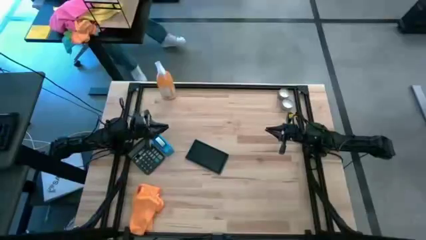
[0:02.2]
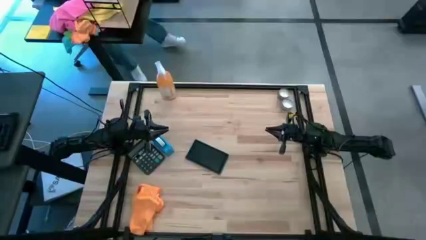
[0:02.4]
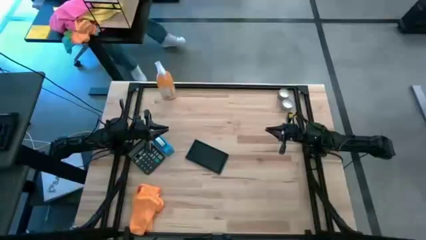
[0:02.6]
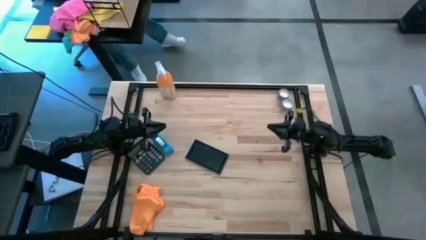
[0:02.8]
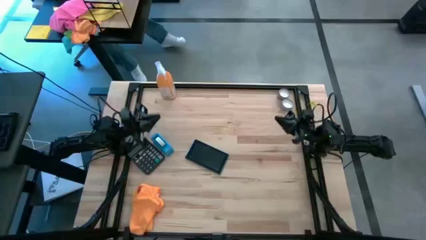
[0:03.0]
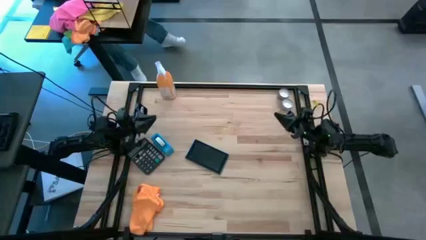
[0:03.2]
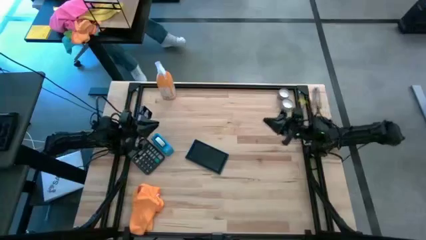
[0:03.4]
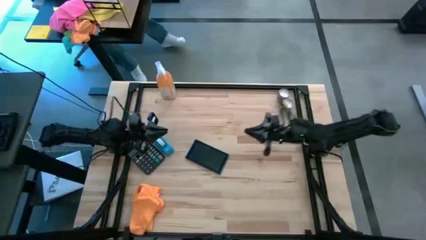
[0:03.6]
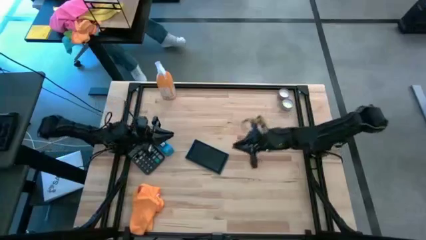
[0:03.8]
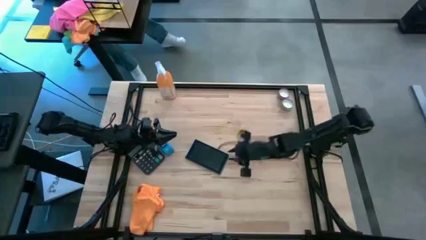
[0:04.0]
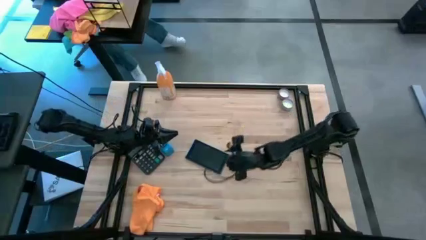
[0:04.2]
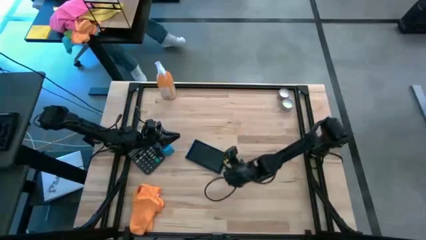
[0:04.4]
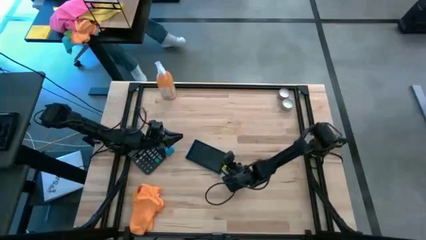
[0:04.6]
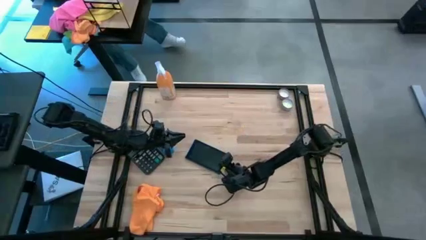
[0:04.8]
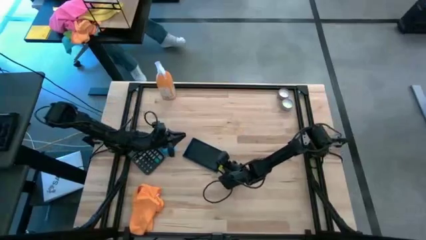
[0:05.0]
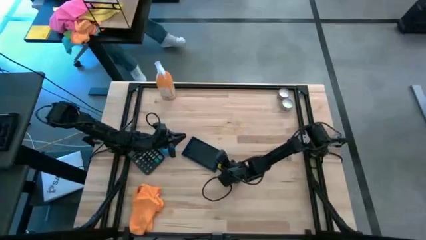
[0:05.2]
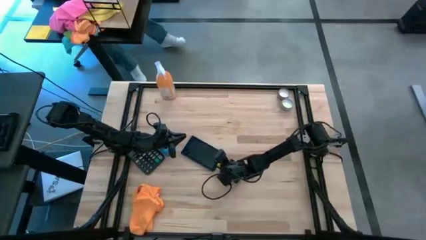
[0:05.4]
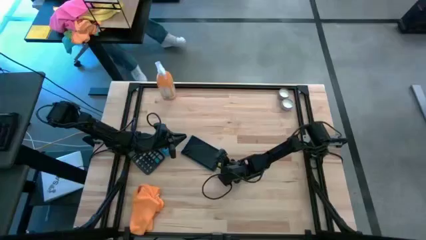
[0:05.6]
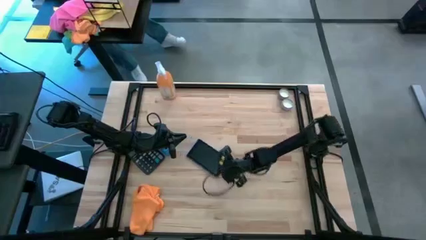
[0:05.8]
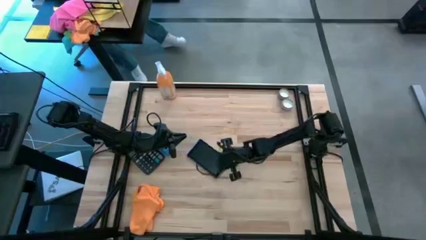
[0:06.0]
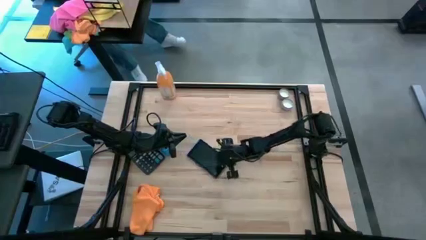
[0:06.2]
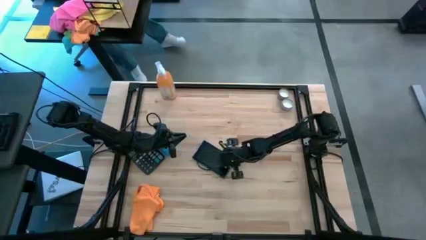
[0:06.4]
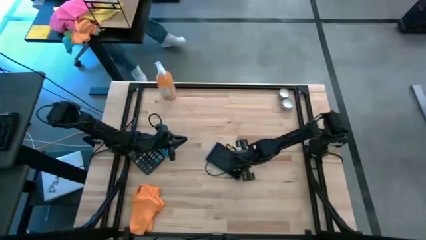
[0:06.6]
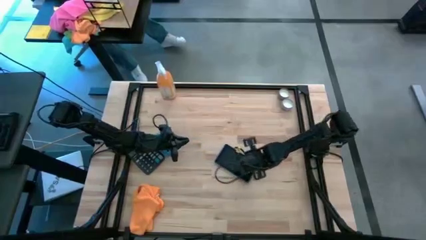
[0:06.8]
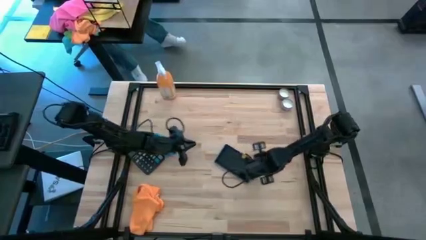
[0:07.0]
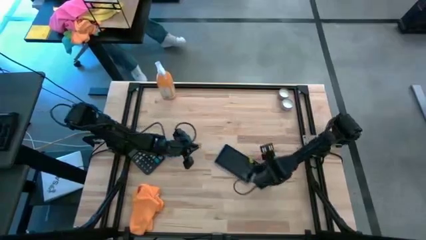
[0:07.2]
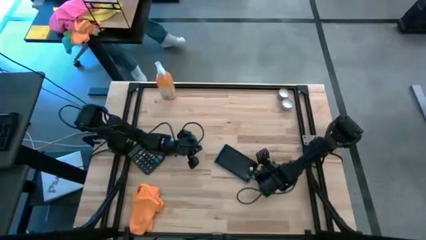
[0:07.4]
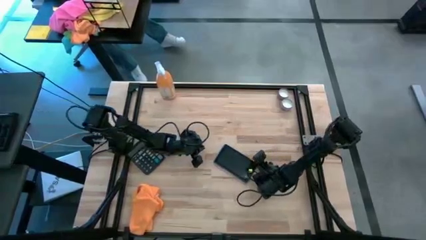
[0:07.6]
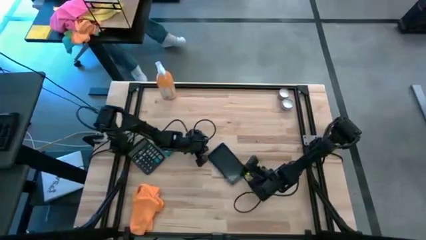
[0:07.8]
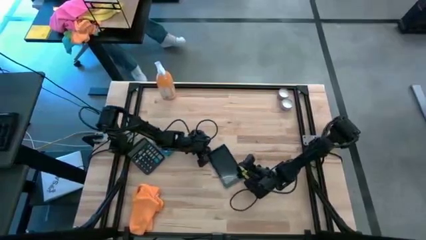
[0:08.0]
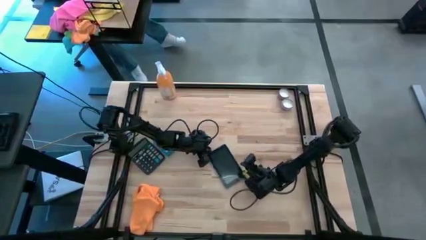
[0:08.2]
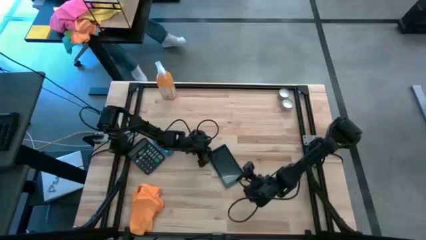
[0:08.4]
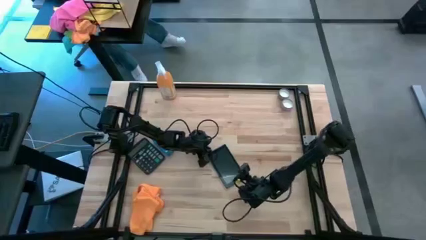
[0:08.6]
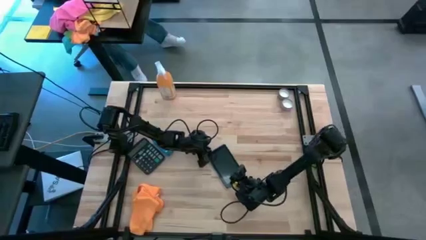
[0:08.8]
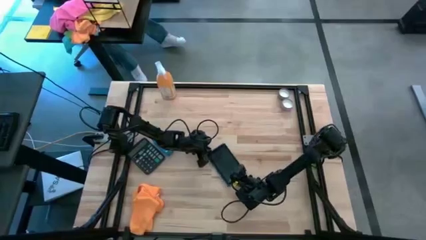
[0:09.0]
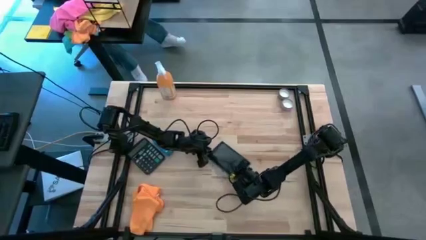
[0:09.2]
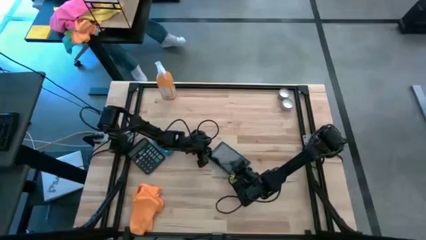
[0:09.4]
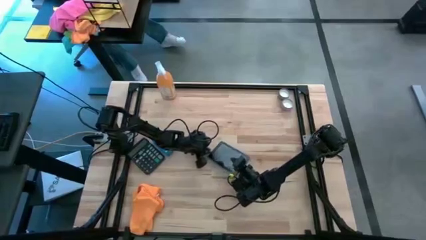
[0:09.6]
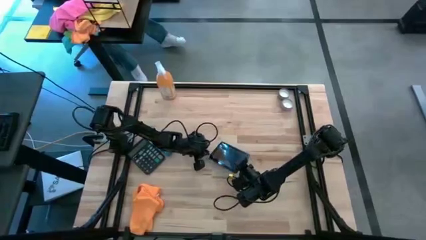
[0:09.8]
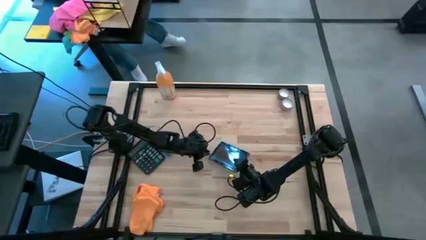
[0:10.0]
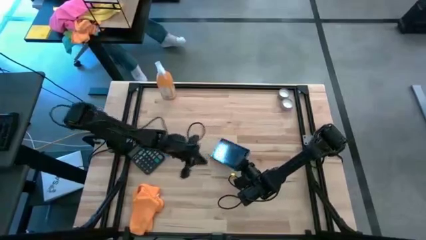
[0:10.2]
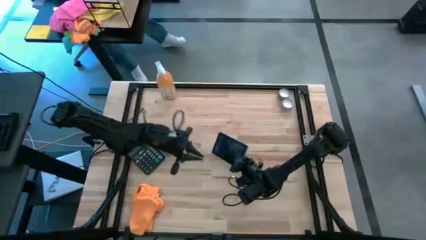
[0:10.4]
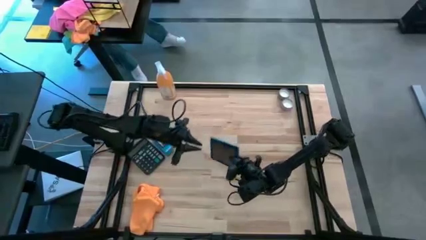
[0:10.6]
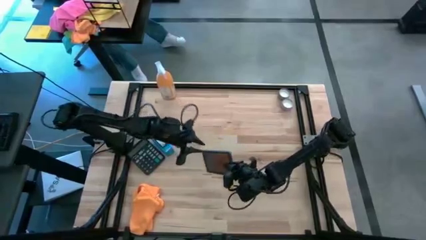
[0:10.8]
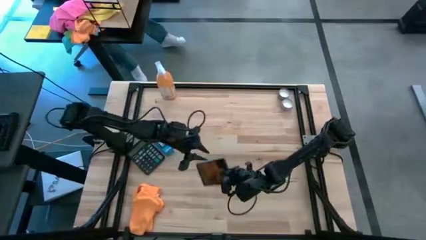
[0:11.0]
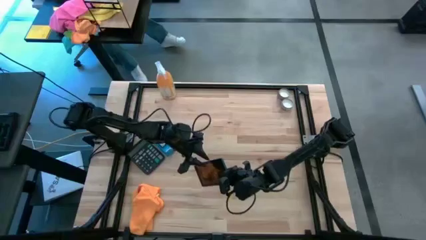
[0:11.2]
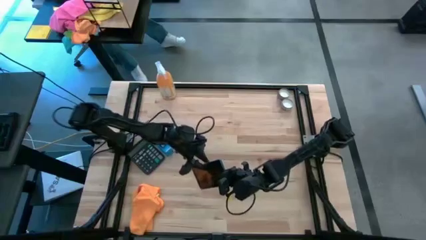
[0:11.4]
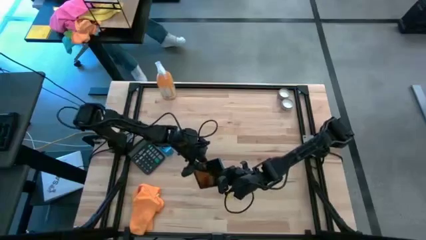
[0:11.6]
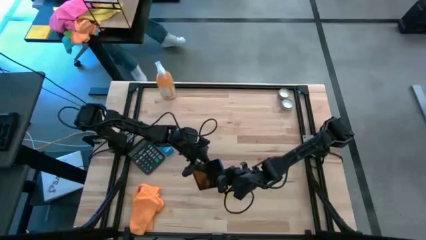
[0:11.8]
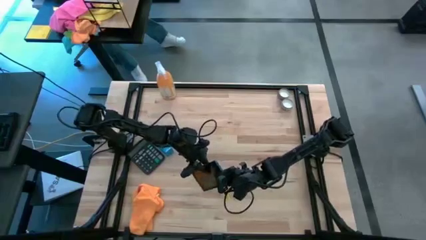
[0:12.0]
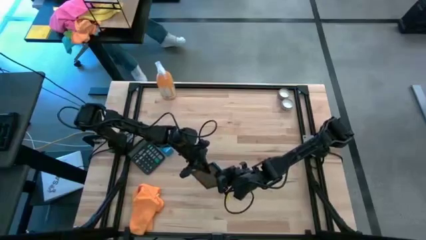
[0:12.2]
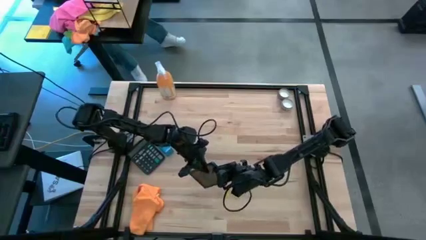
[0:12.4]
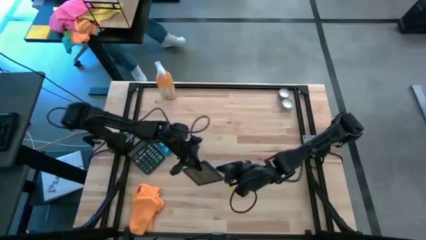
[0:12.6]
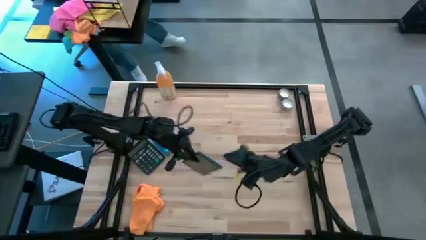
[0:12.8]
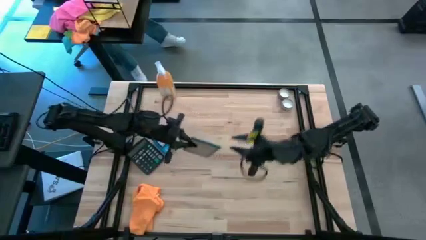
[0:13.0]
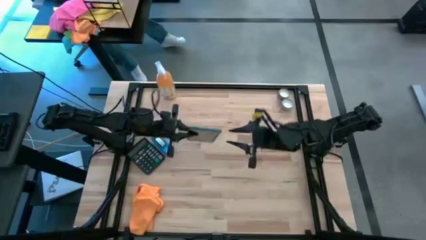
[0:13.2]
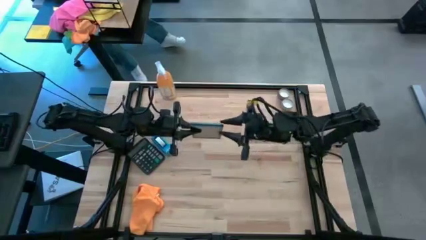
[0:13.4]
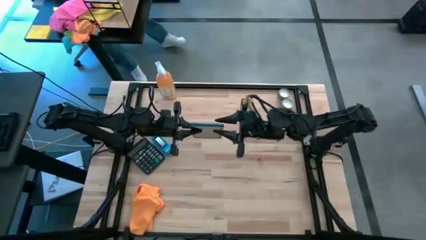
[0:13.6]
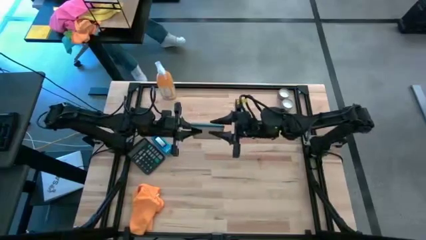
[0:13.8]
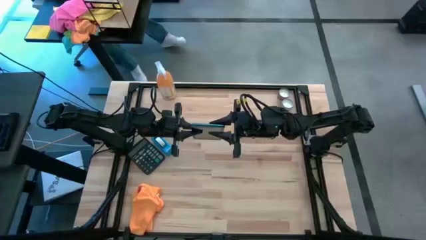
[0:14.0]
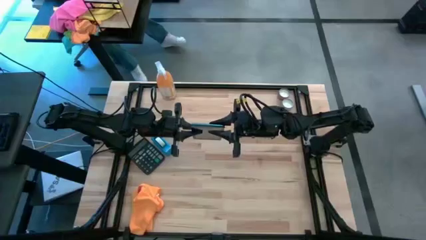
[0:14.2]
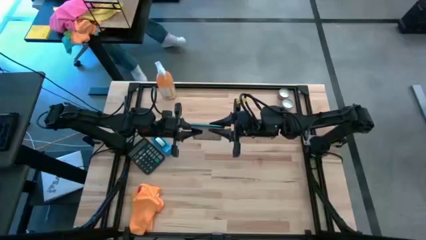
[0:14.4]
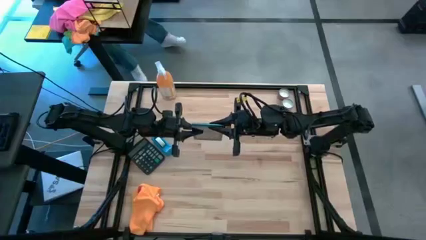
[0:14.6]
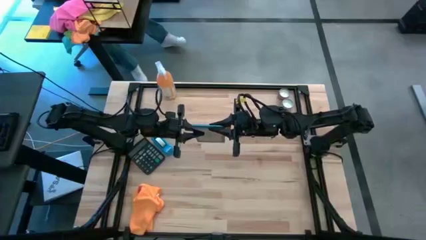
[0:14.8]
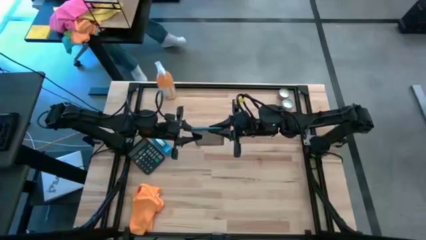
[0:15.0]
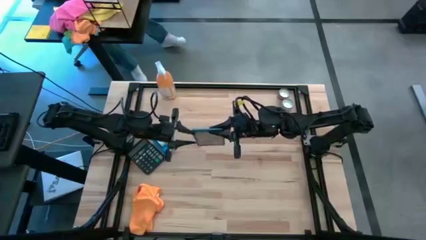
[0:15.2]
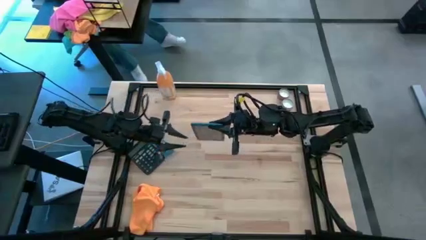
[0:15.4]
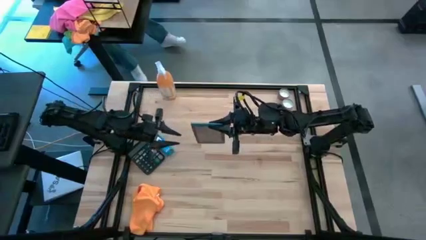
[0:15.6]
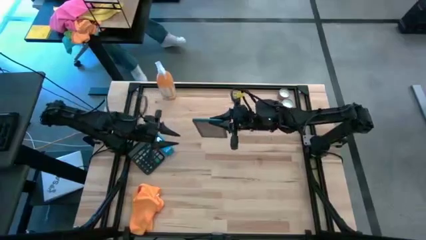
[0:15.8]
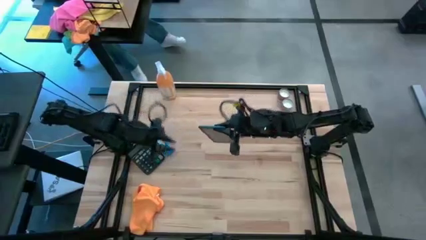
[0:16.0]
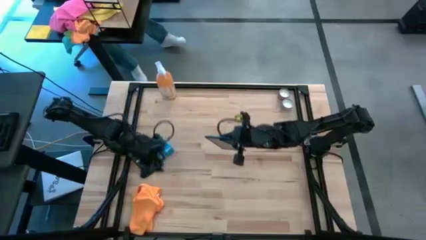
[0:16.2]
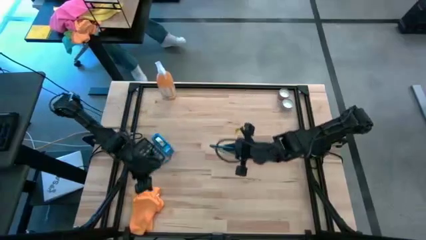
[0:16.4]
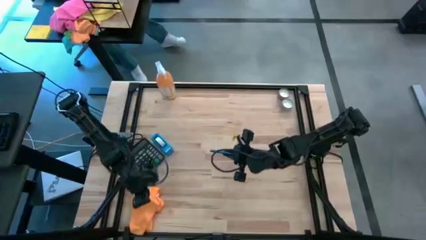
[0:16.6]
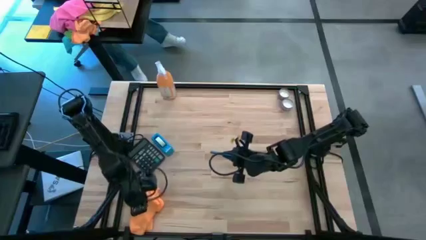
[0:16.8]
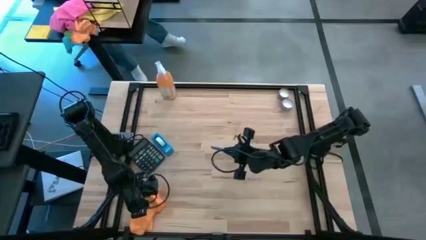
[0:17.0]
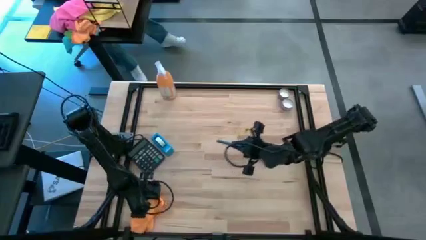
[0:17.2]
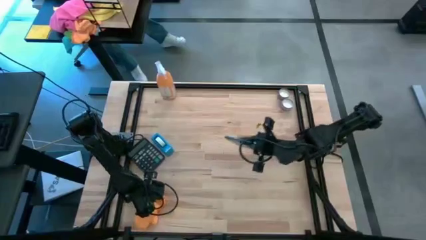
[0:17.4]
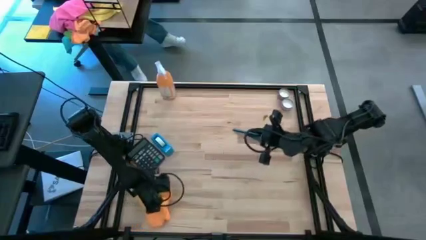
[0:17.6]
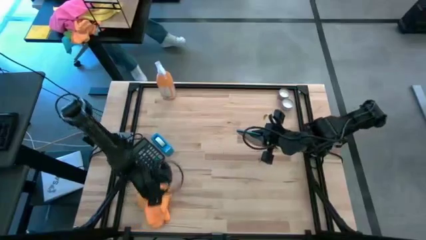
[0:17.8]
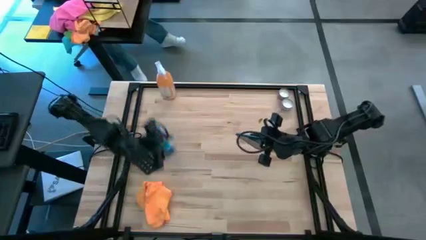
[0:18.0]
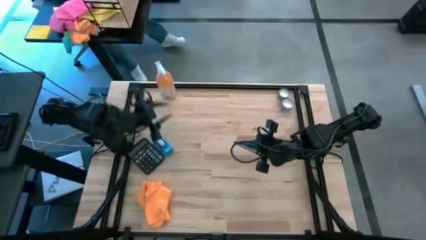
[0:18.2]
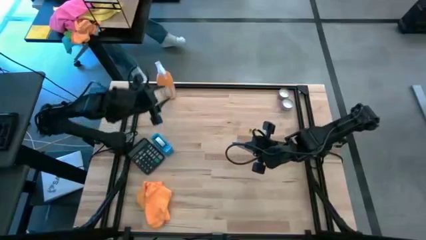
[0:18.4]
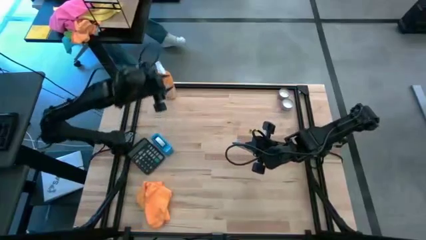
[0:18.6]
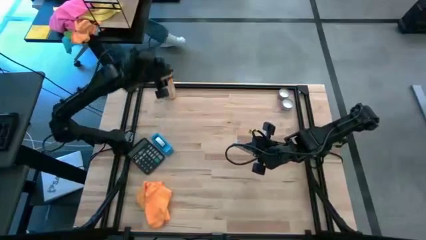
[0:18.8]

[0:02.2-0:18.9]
Task: Apply microfiber cloth
Spray the blue phone using the orange spray bottle
